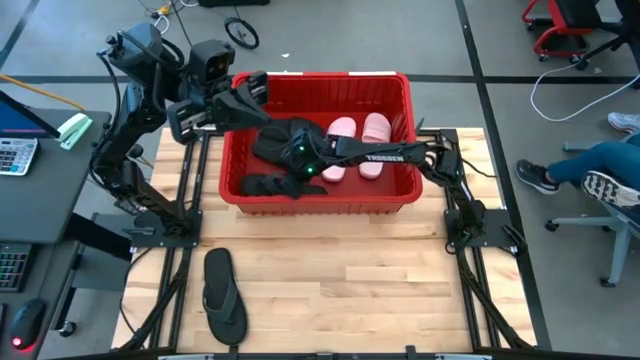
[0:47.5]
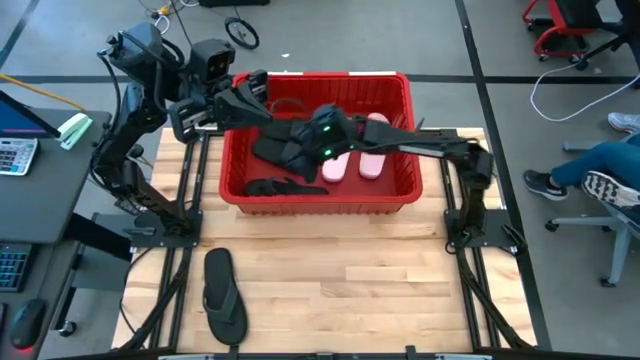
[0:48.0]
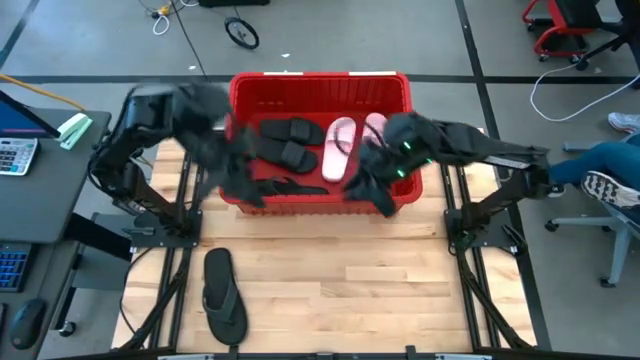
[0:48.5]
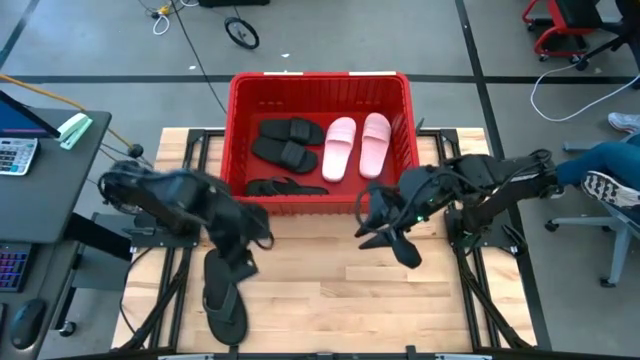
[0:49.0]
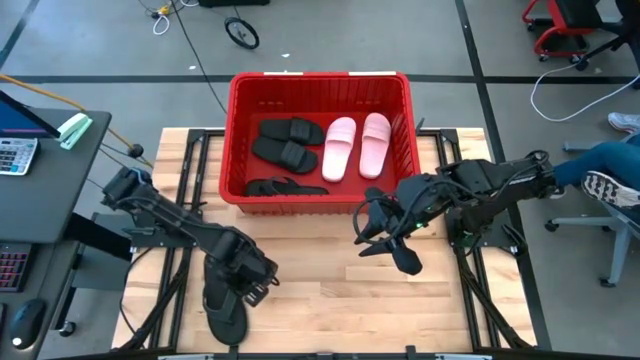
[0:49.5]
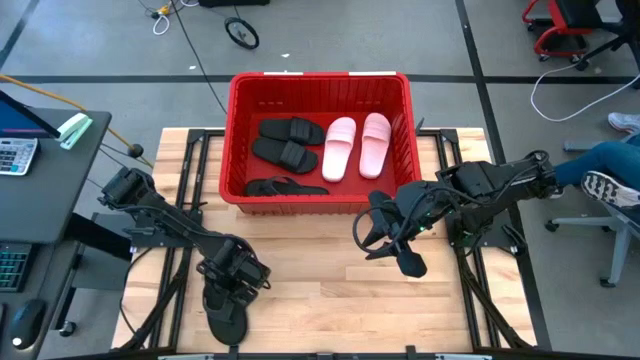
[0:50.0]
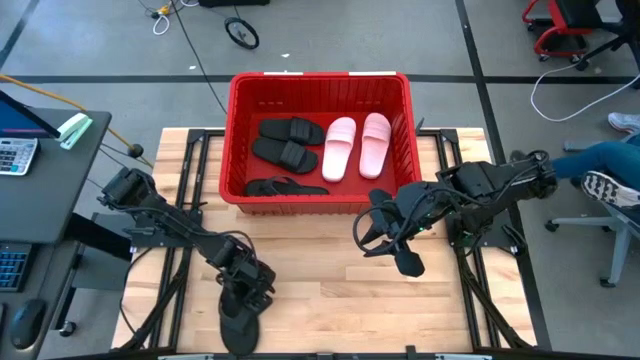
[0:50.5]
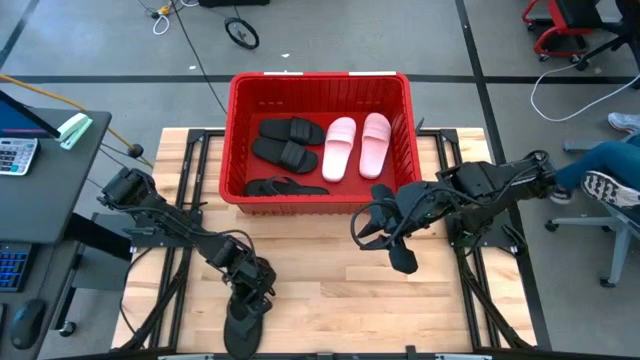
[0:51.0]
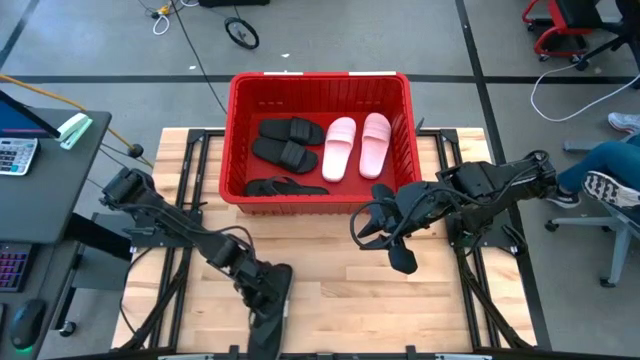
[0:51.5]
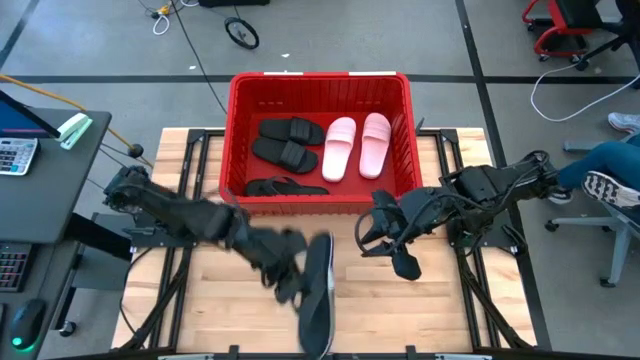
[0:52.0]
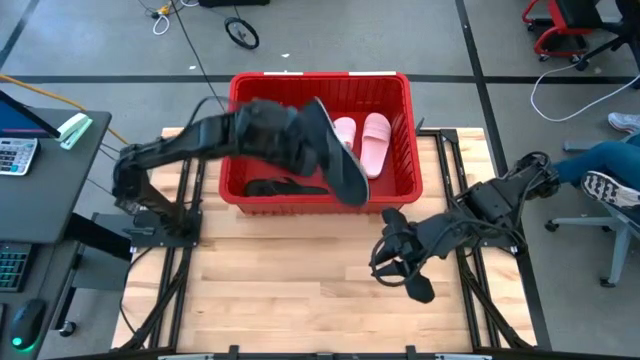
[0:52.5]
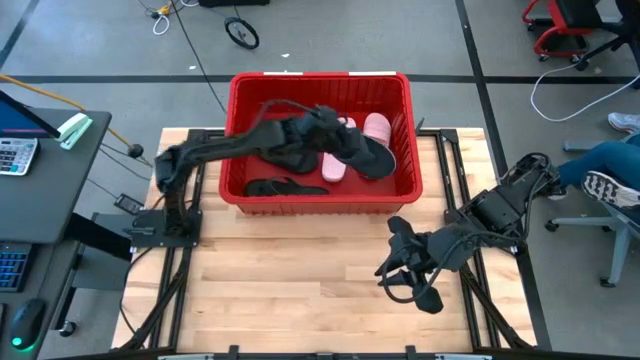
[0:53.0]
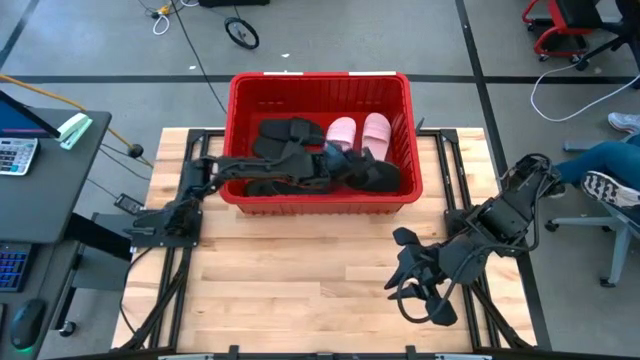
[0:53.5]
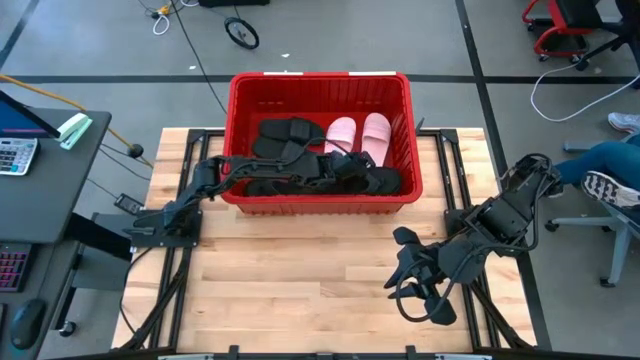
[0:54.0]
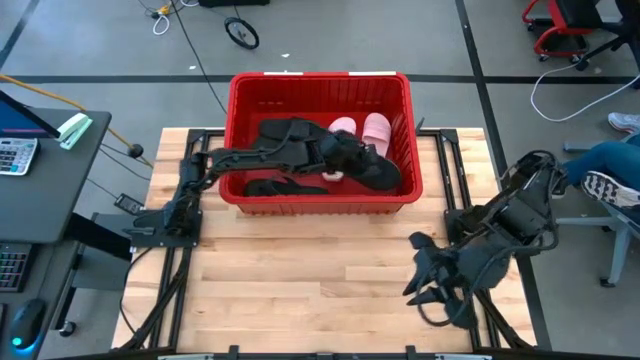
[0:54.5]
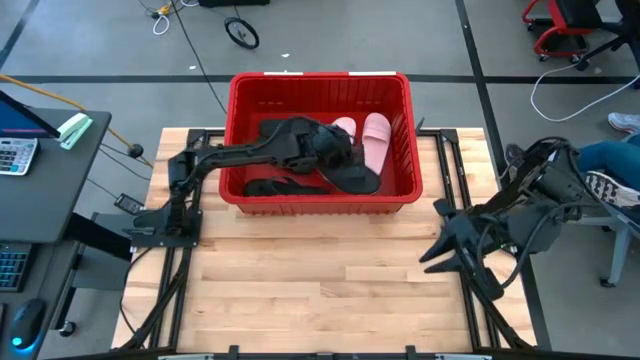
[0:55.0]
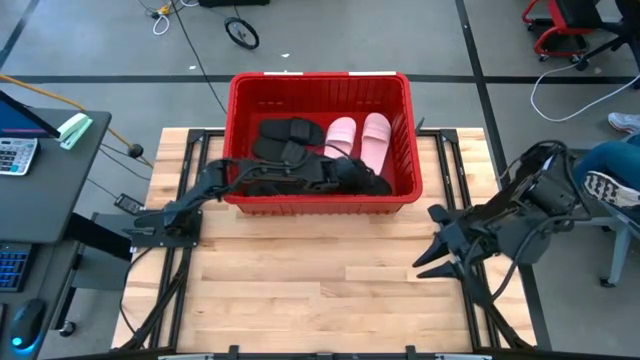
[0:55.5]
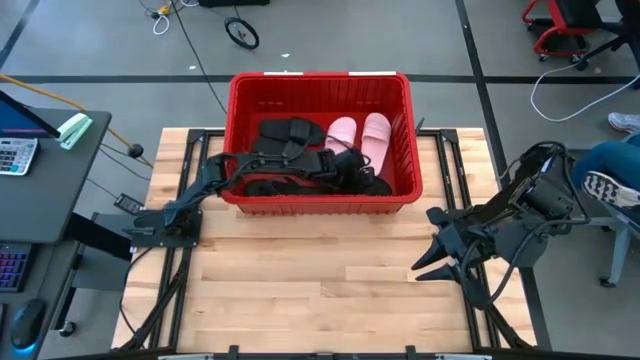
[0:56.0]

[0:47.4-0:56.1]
Task: Pick and place slides into bin
Put the black slides into the red bin

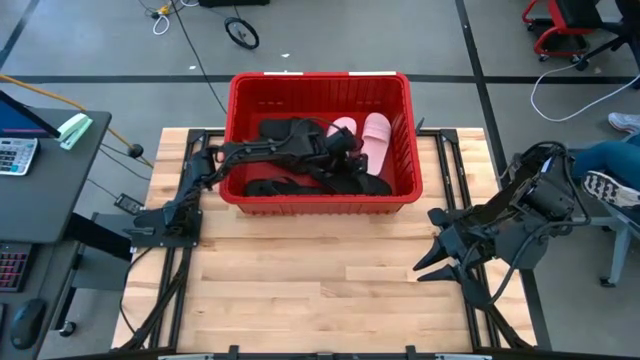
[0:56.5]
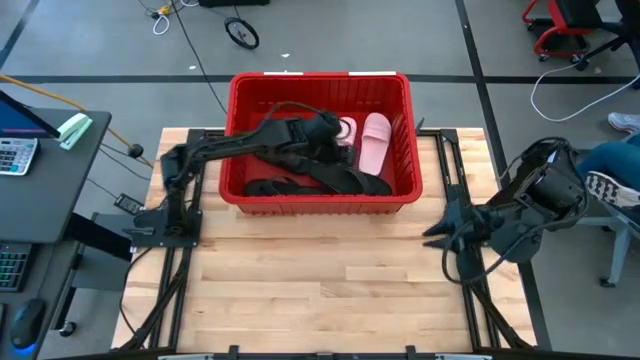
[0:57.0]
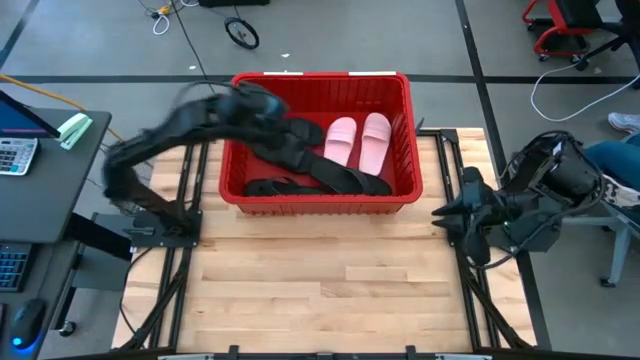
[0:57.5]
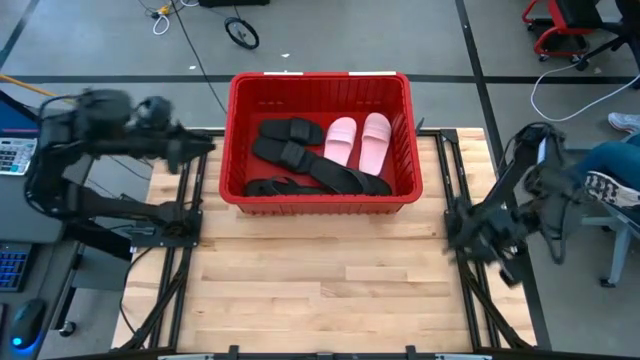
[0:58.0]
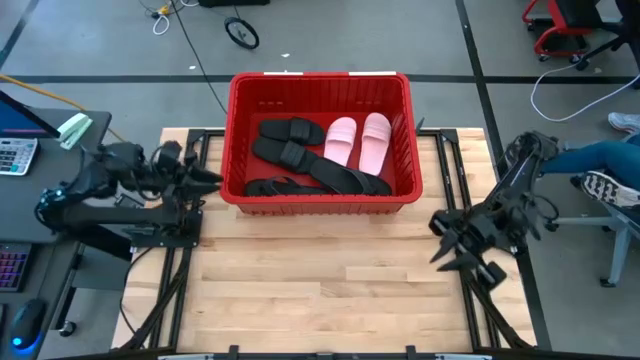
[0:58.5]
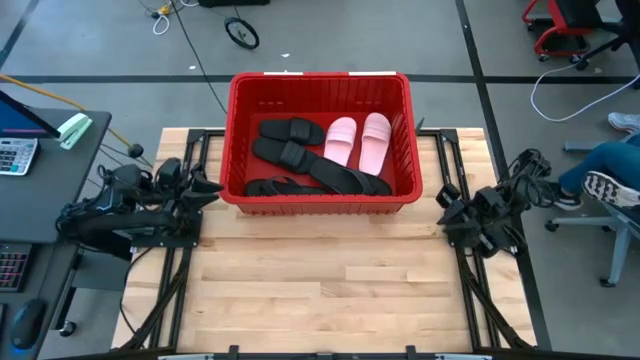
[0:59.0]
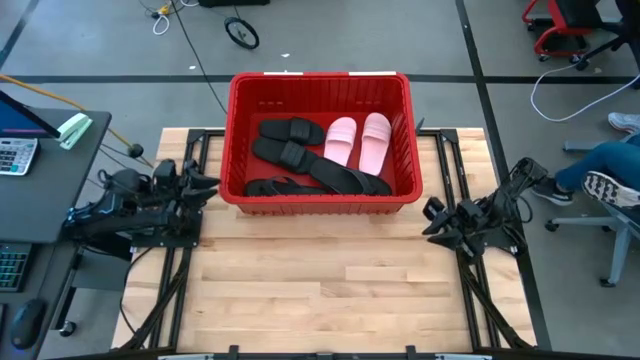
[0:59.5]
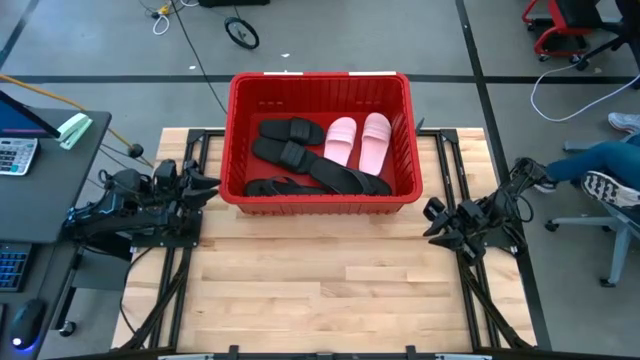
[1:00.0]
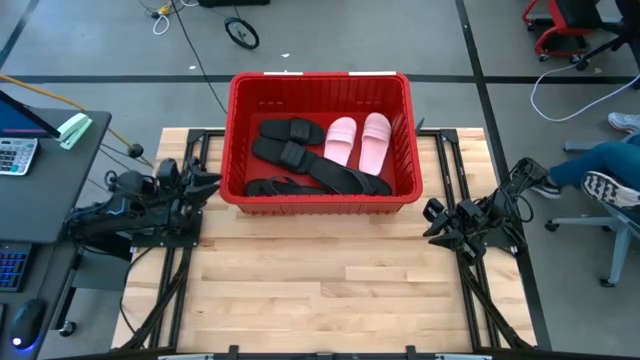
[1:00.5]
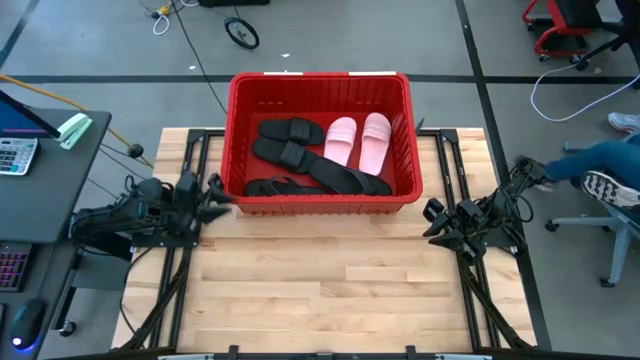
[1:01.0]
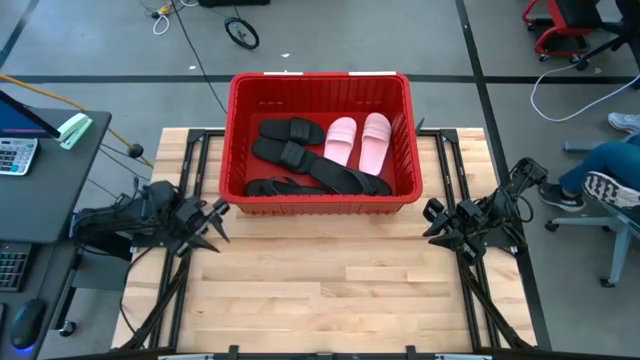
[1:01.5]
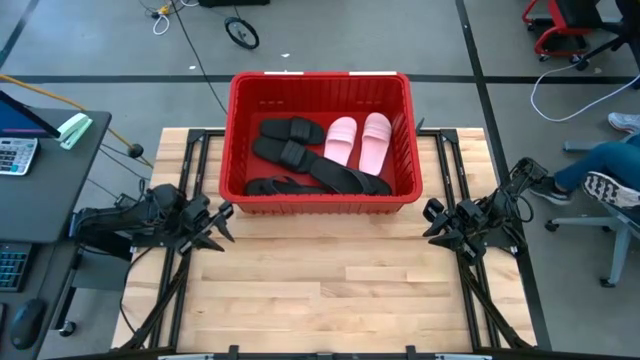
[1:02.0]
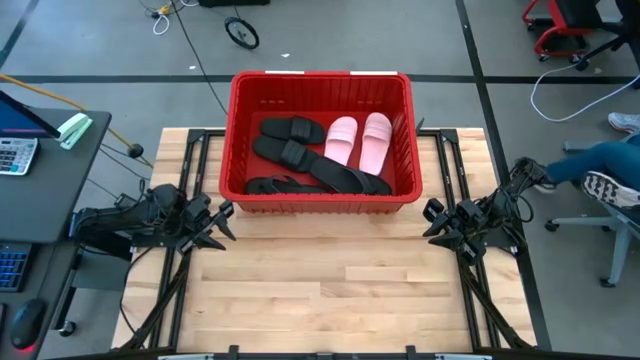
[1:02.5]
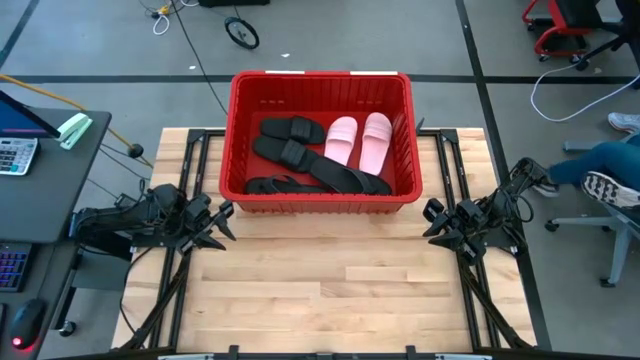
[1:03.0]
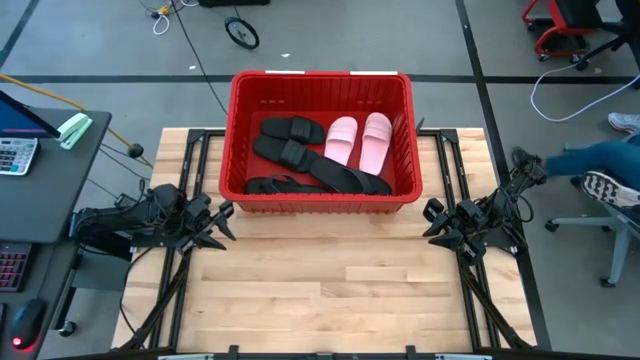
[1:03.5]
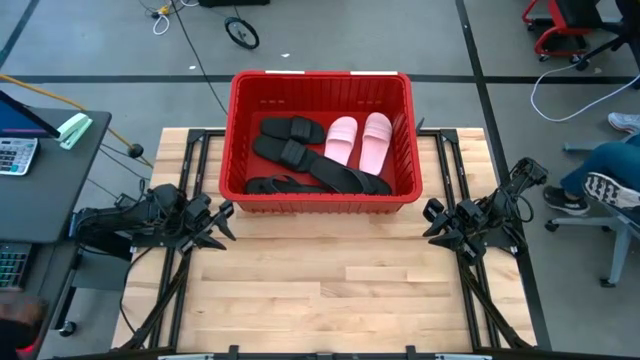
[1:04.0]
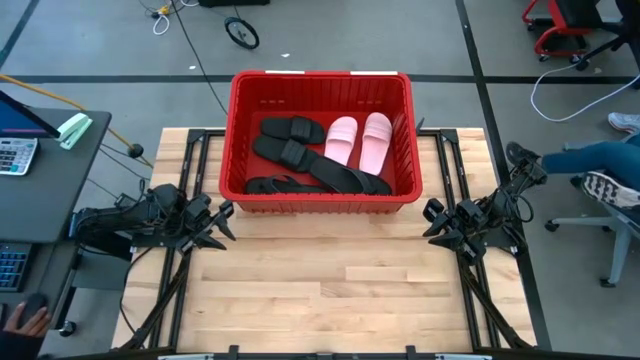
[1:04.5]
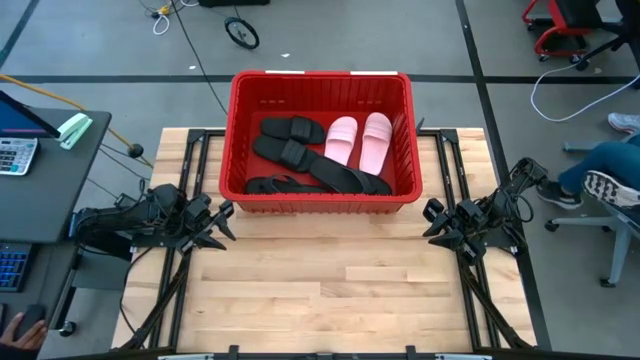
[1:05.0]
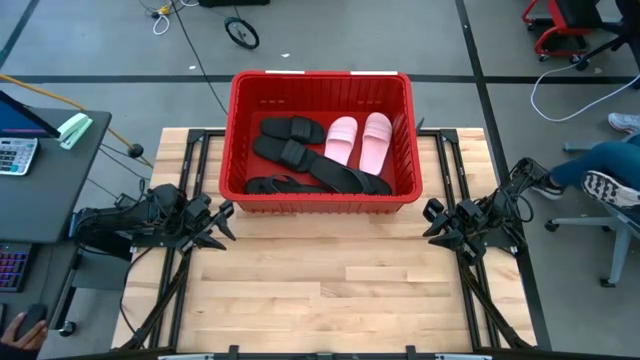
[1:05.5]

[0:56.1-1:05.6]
Return to Home Position

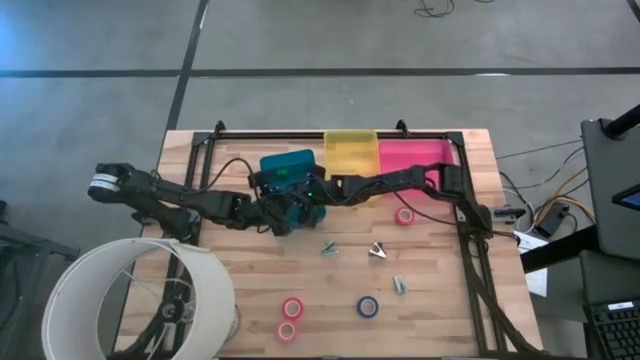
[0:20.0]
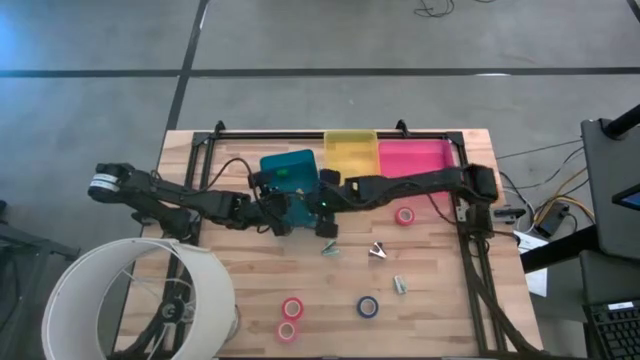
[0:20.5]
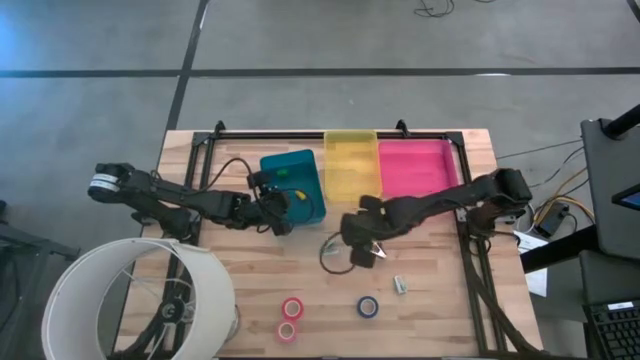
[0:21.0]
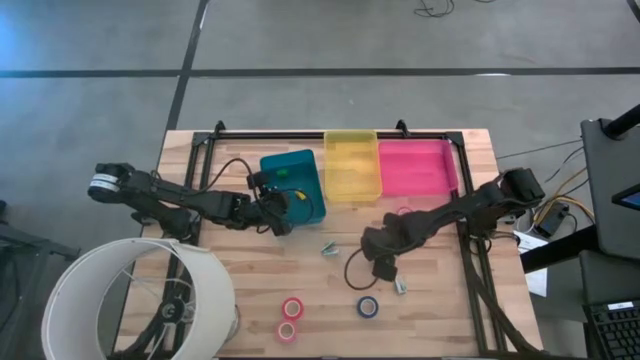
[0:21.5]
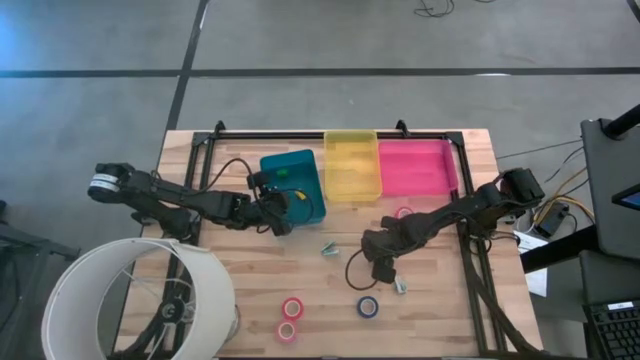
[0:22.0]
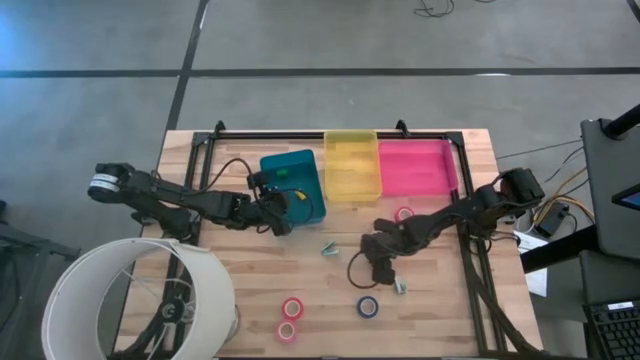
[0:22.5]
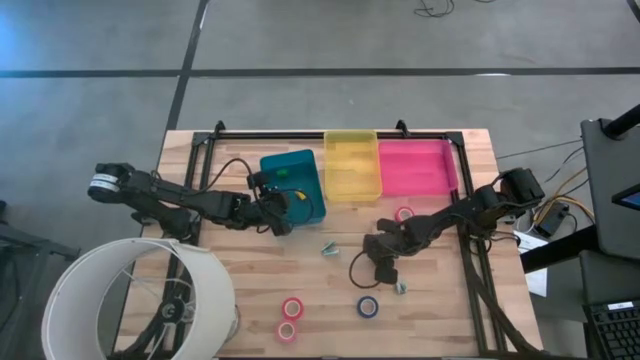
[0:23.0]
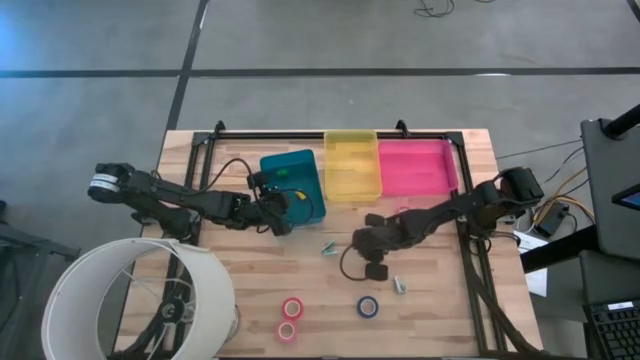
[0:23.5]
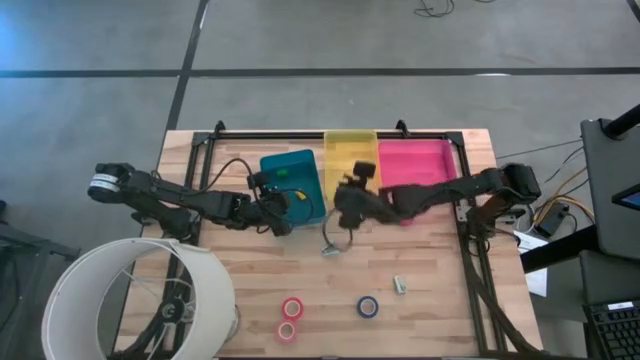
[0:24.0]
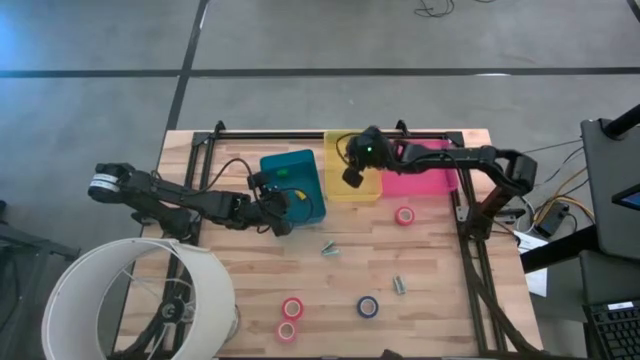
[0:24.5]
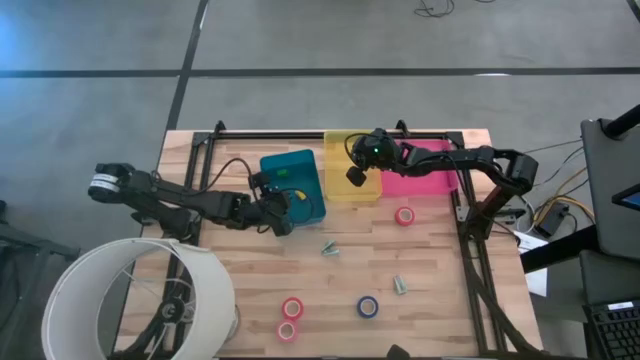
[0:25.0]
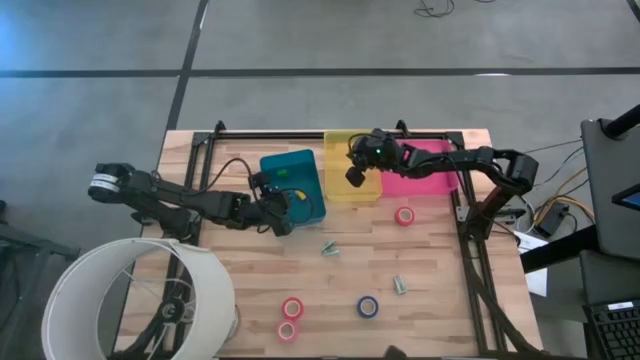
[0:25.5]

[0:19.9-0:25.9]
Task: Pick and place Stapler, Stapler remover, tape
Put the black staple remover into the yellow bin
